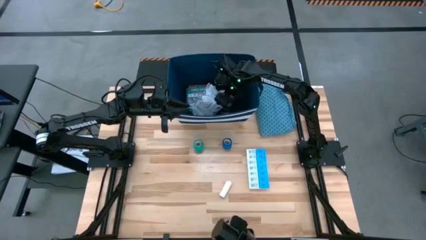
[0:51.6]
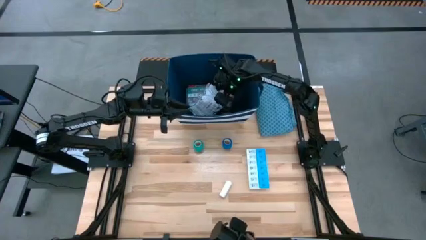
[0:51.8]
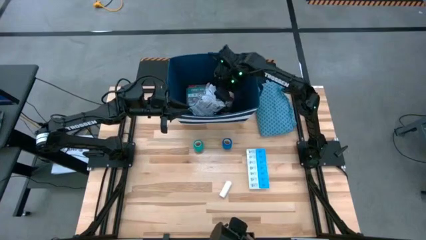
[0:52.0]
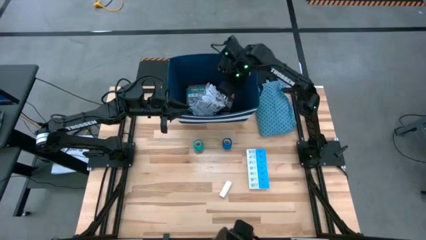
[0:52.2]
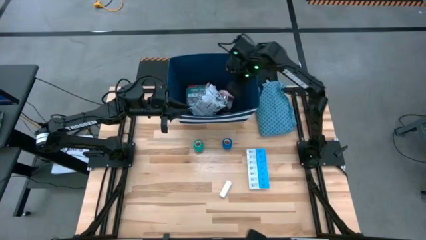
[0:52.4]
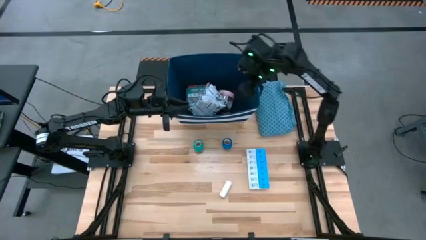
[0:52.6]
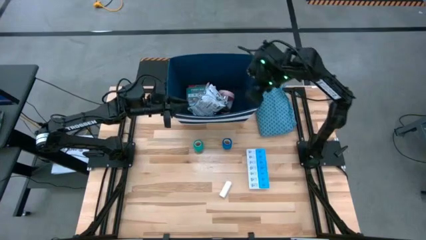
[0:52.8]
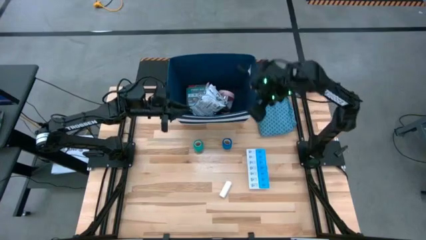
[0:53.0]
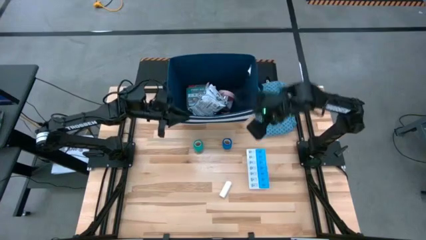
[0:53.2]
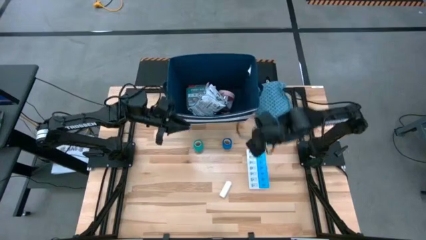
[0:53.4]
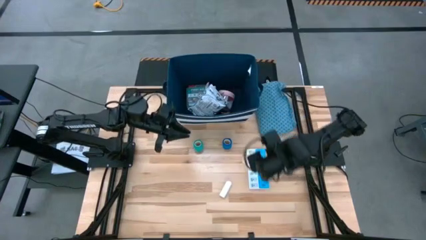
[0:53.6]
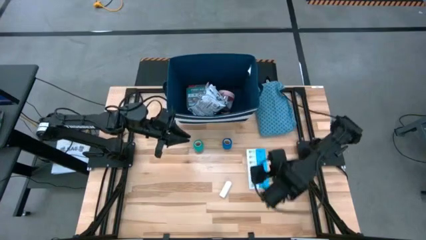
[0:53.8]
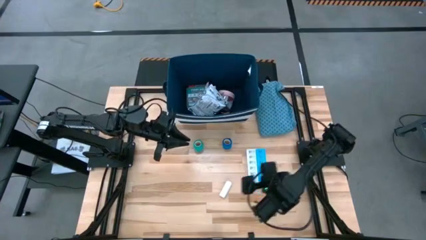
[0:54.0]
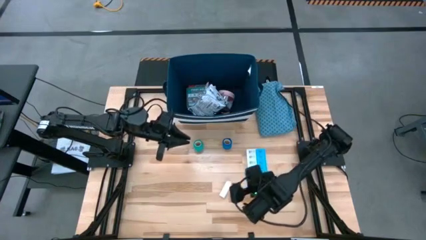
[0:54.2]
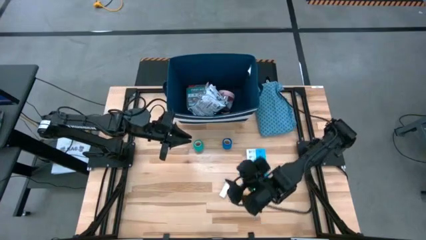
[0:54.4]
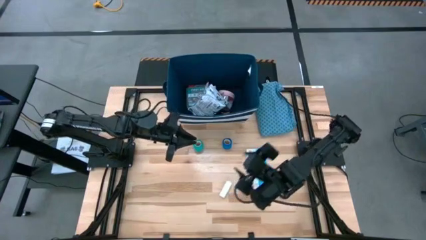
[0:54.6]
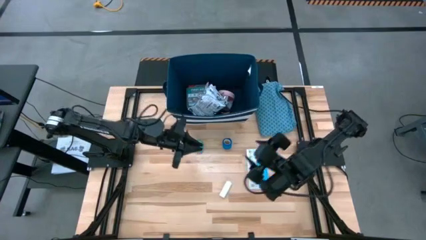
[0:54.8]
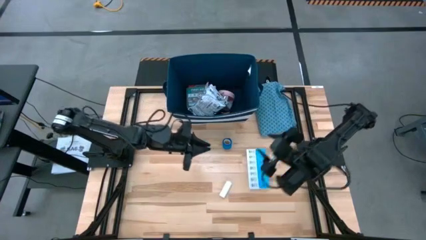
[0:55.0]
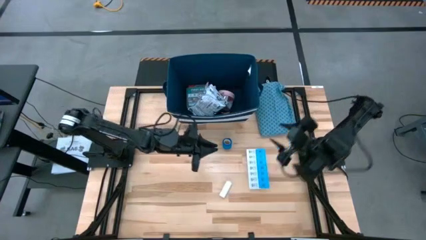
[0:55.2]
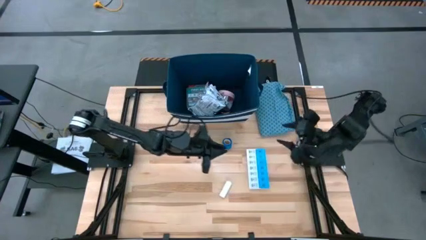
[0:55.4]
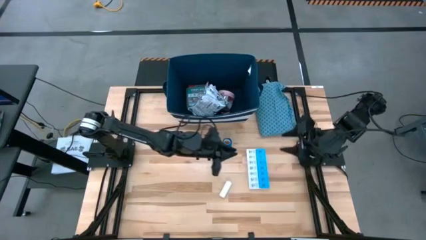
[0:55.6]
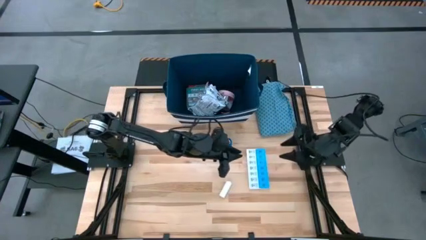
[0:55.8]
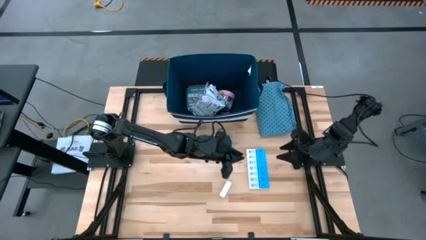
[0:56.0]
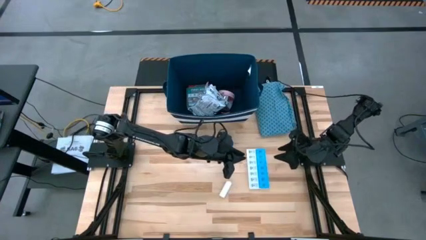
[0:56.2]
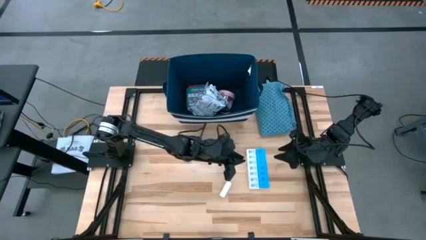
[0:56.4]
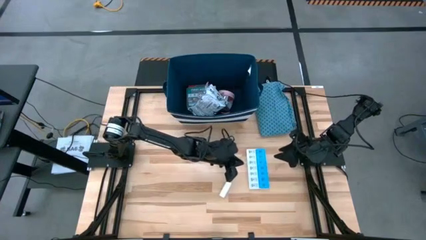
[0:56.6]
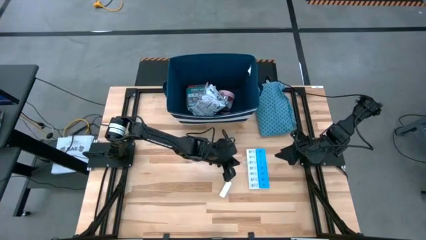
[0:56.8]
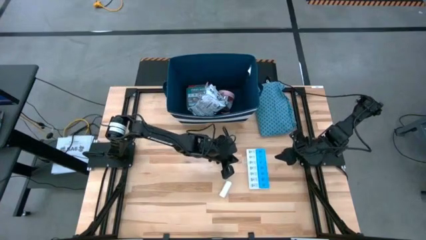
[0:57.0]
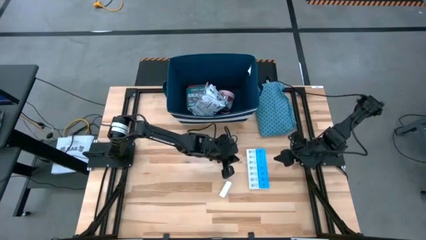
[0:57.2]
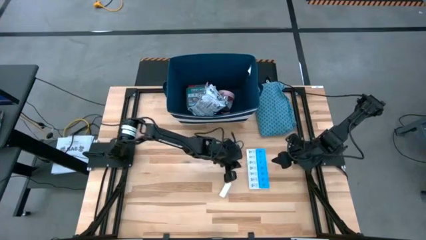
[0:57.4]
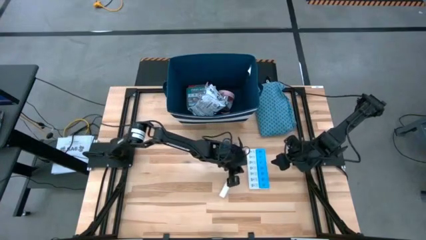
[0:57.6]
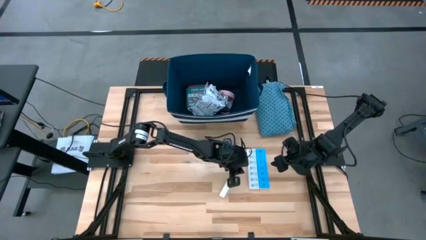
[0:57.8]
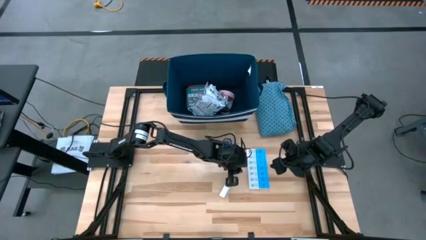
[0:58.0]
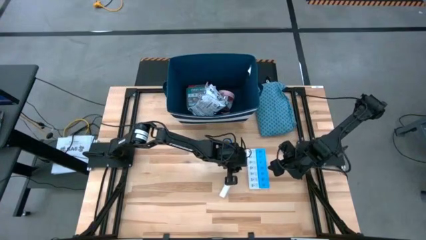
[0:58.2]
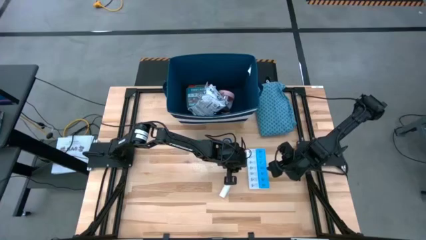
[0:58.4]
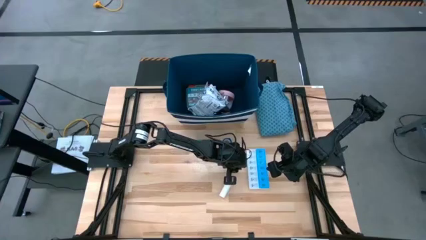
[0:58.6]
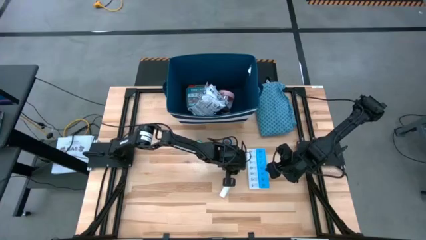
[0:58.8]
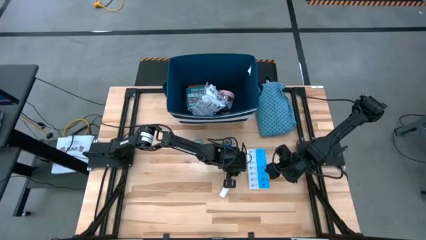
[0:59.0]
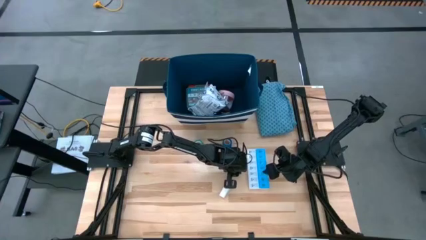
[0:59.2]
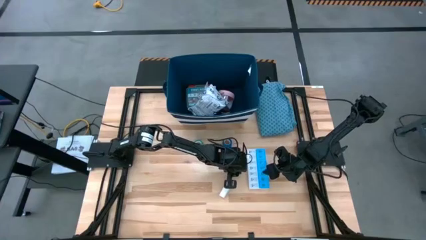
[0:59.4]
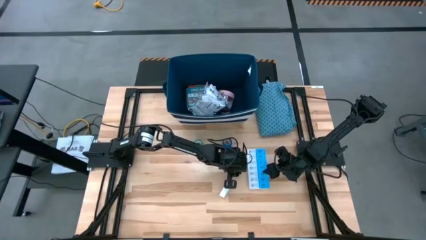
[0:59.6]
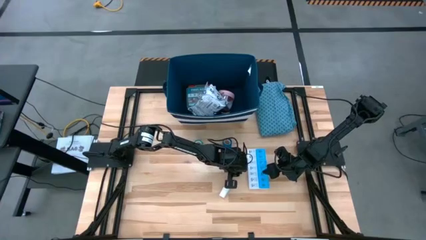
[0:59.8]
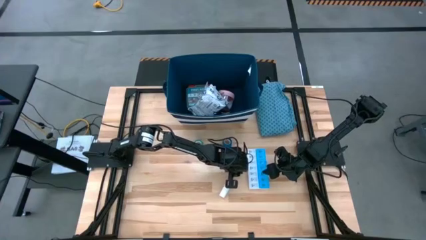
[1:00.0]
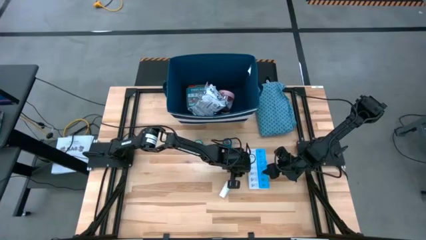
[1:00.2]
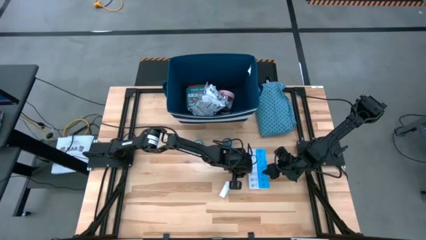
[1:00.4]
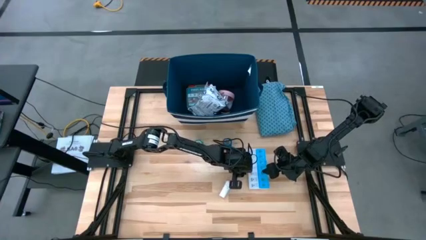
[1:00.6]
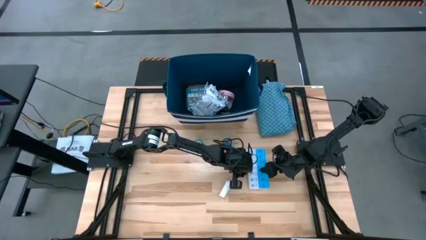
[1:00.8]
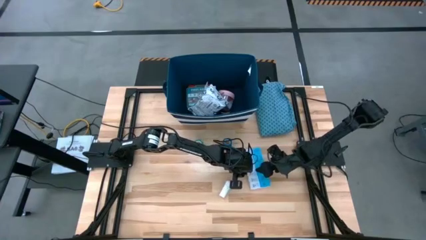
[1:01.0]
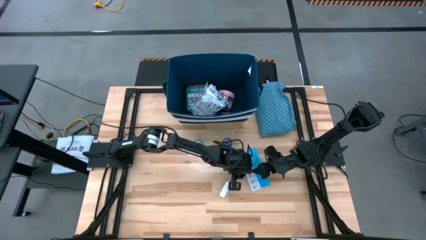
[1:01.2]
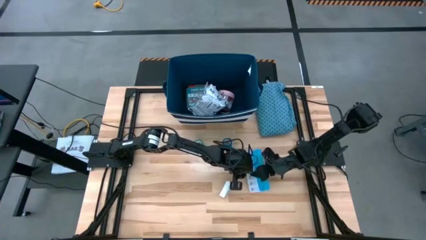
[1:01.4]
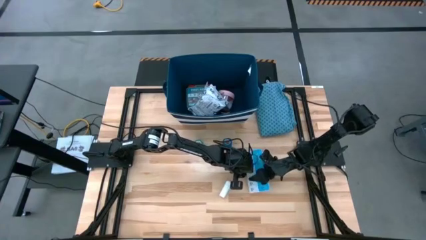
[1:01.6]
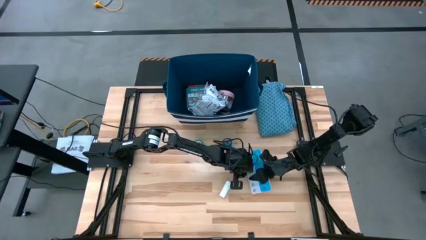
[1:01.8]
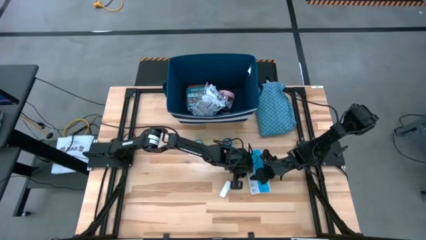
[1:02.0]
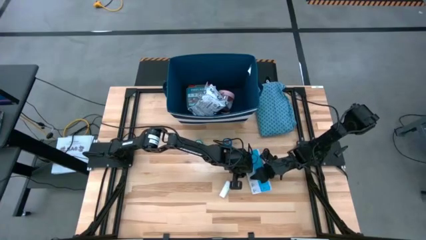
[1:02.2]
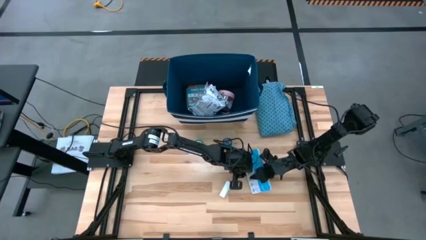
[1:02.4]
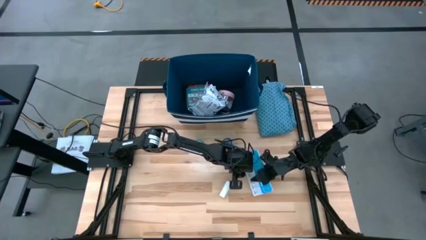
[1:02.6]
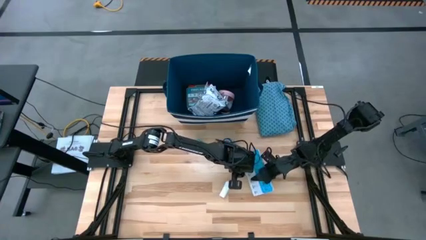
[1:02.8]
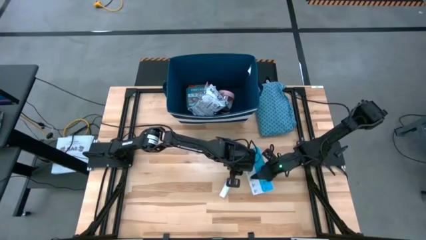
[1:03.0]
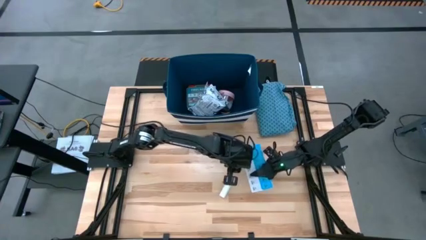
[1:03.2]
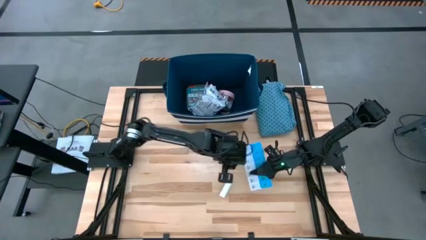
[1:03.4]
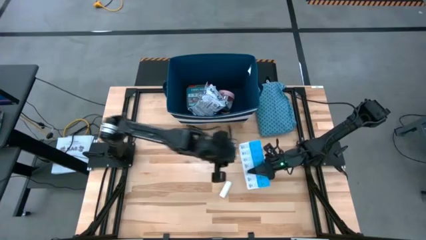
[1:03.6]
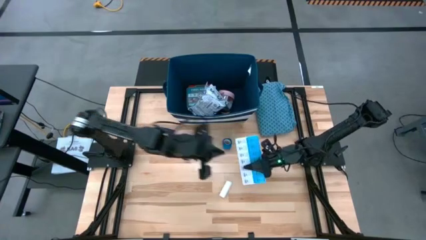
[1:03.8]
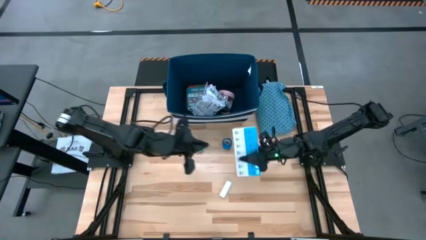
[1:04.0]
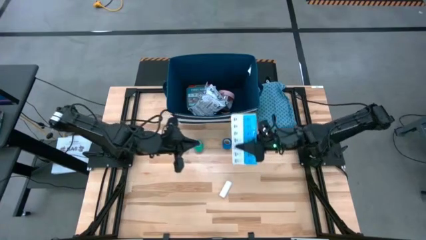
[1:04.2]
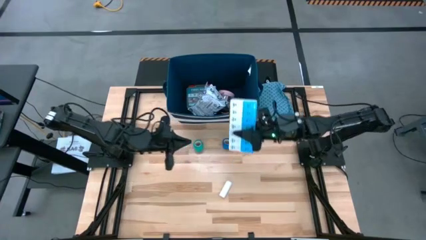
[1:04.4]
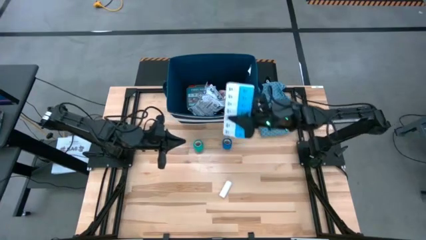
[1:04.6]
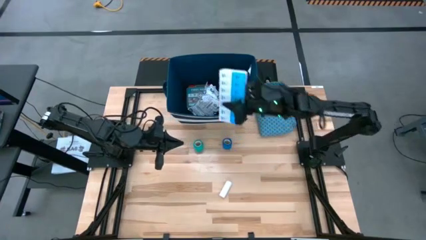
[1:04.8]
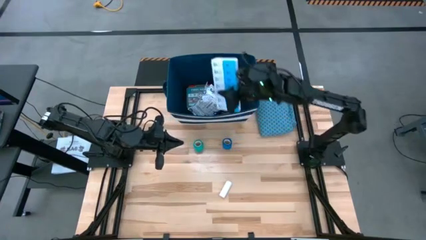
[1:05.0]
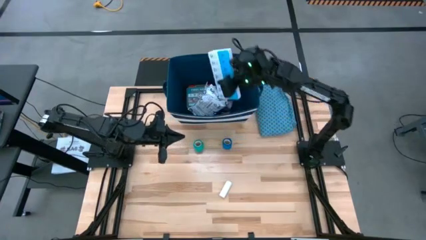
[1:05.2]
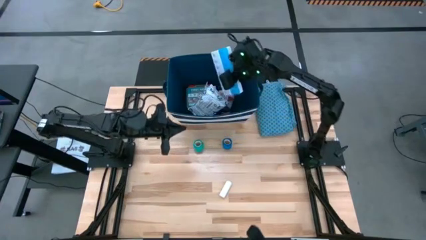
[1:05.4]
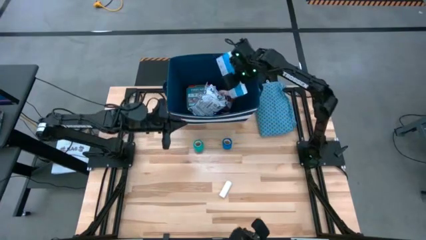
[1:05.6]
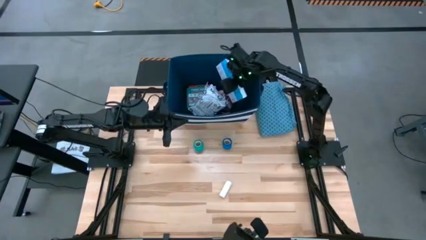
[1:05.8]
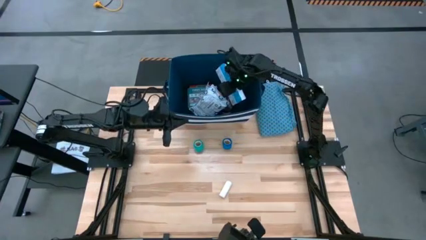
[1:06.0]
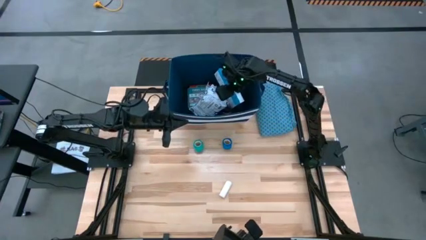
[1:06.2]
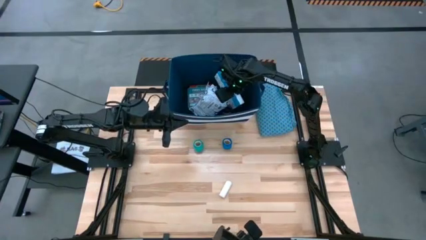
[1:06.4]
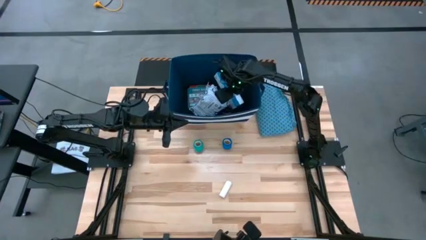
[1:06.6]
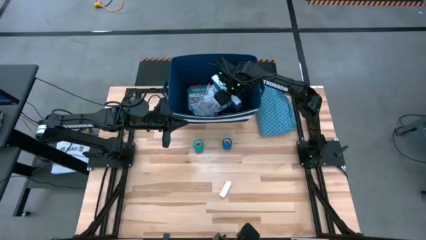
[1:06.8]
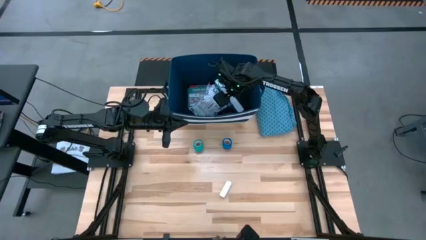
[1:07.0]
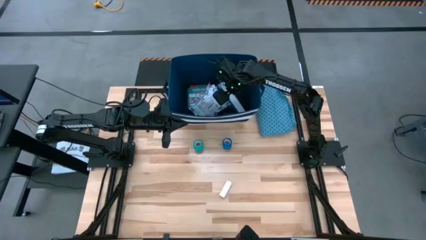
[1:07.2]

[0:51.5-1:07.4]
Task: Pick & place medical supplies in basket/bin
Put the pill organizer into the bin
